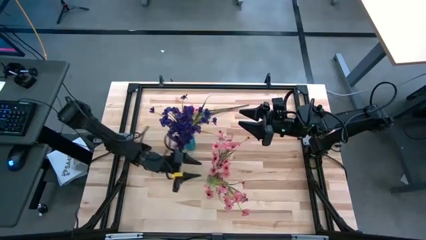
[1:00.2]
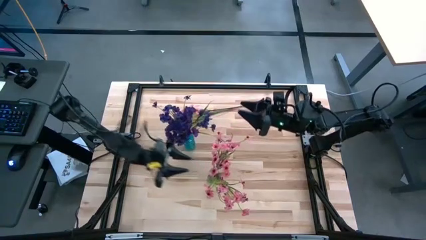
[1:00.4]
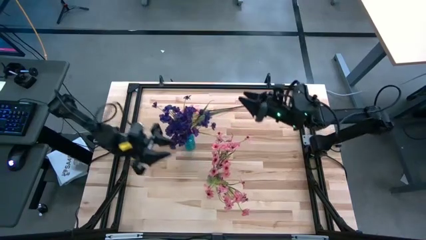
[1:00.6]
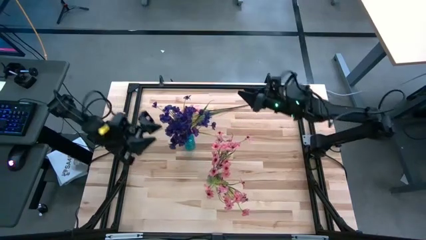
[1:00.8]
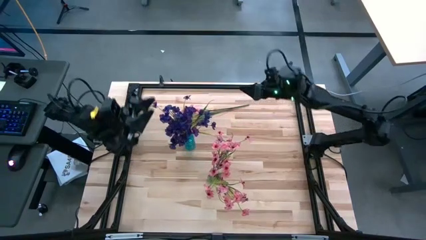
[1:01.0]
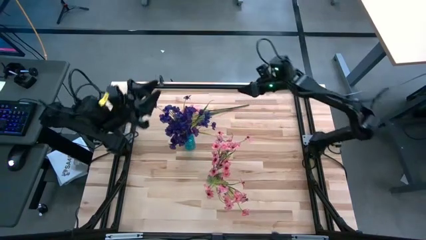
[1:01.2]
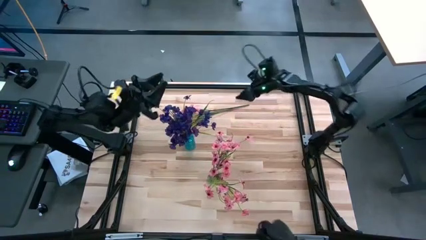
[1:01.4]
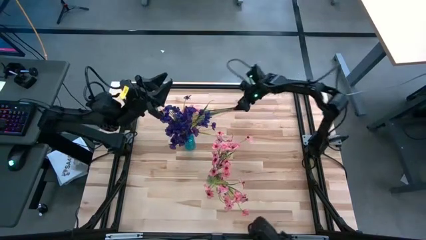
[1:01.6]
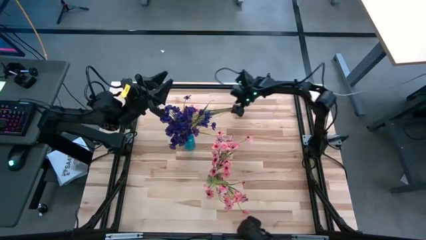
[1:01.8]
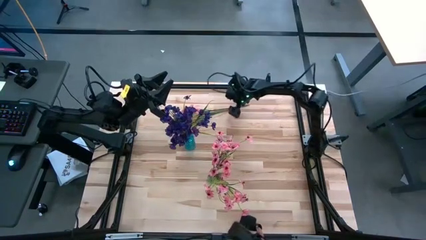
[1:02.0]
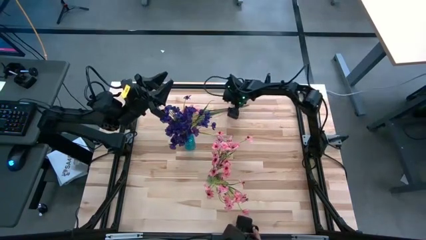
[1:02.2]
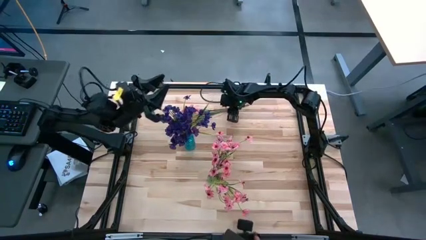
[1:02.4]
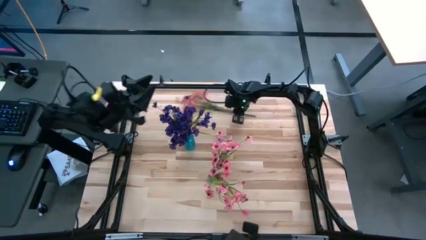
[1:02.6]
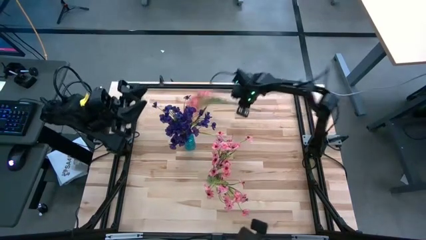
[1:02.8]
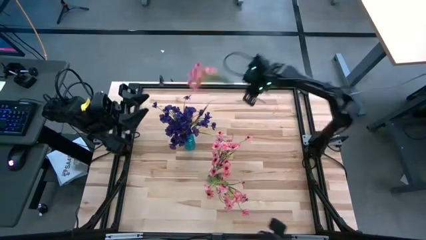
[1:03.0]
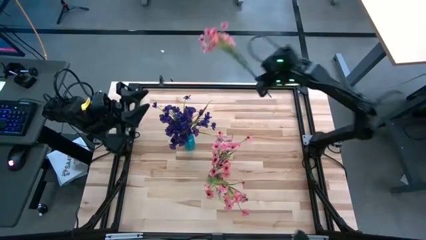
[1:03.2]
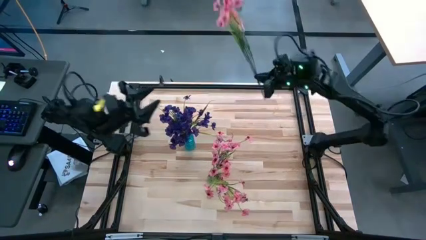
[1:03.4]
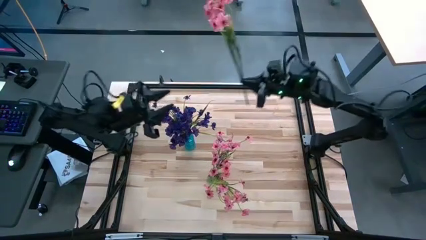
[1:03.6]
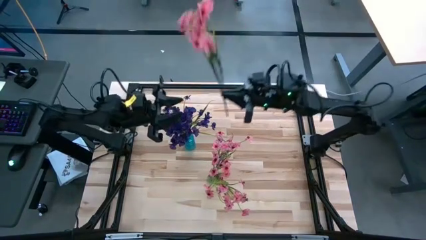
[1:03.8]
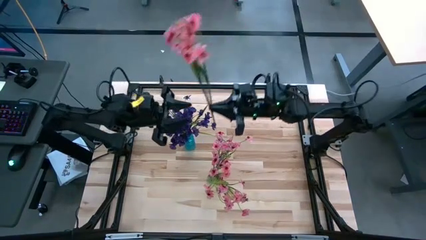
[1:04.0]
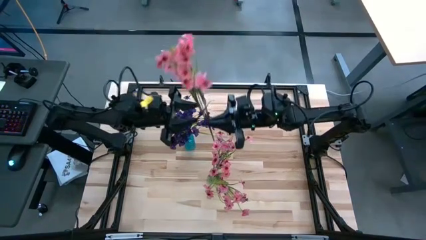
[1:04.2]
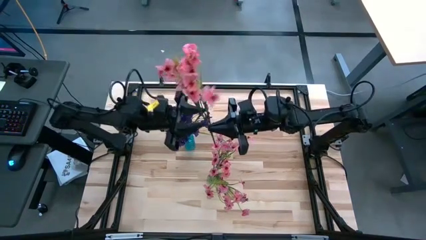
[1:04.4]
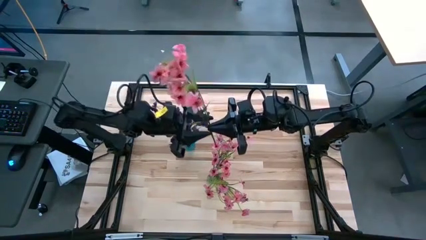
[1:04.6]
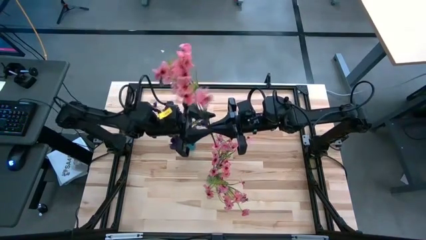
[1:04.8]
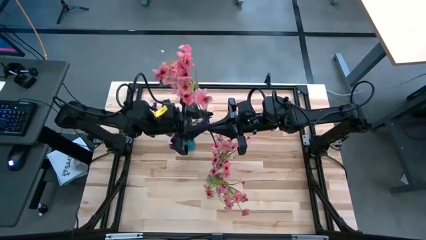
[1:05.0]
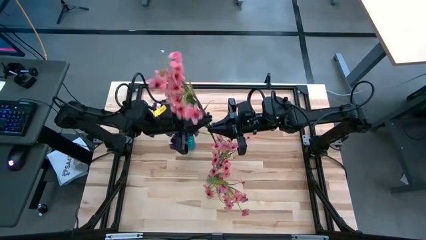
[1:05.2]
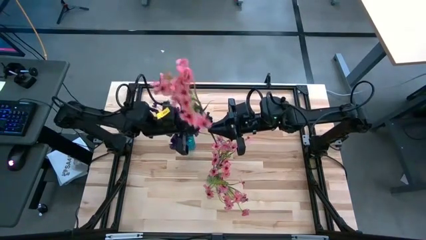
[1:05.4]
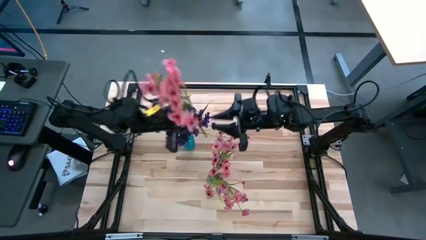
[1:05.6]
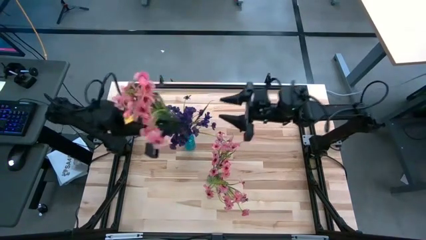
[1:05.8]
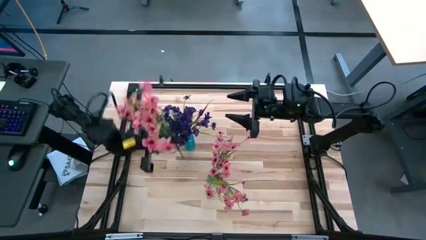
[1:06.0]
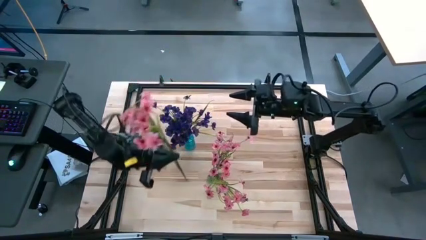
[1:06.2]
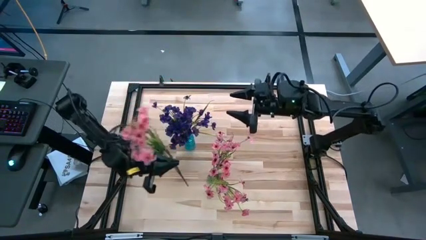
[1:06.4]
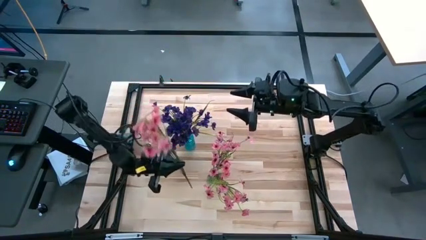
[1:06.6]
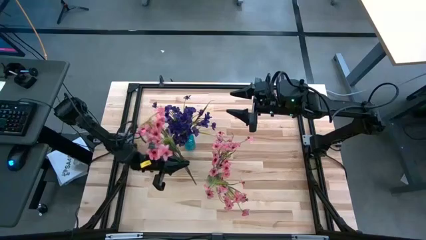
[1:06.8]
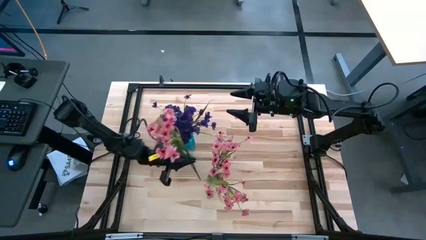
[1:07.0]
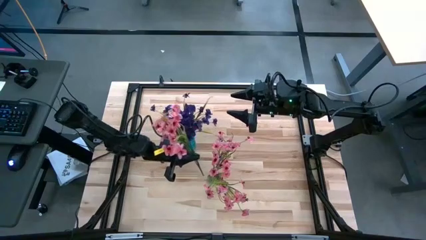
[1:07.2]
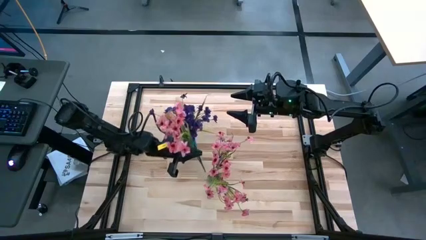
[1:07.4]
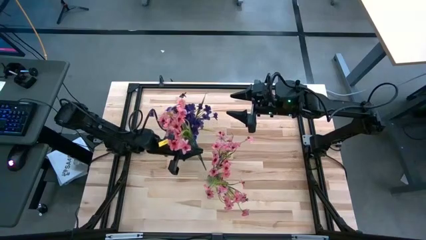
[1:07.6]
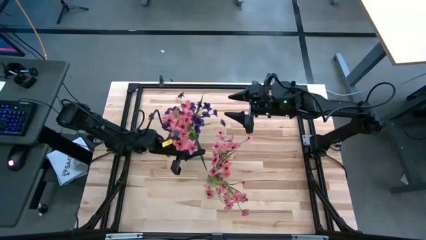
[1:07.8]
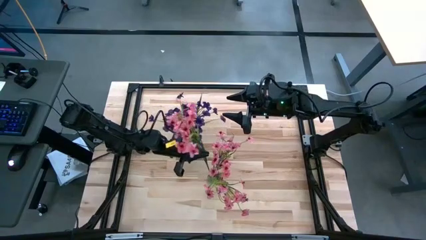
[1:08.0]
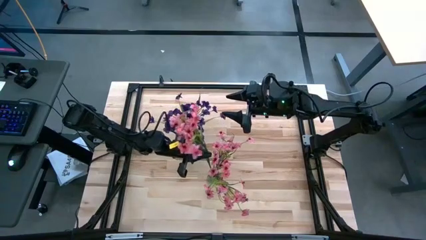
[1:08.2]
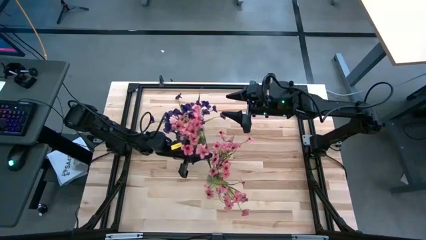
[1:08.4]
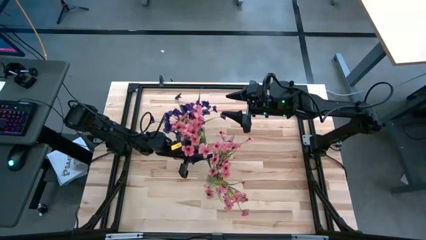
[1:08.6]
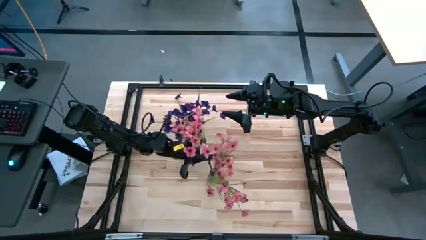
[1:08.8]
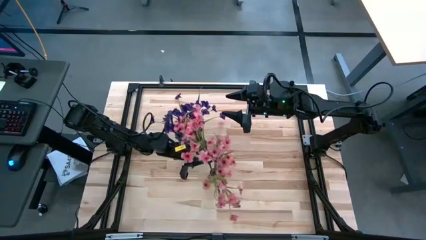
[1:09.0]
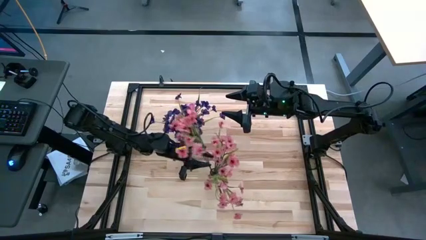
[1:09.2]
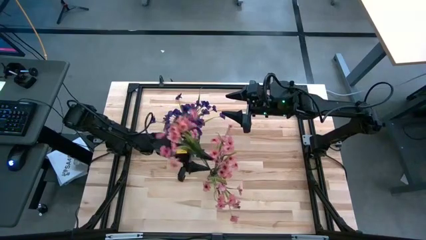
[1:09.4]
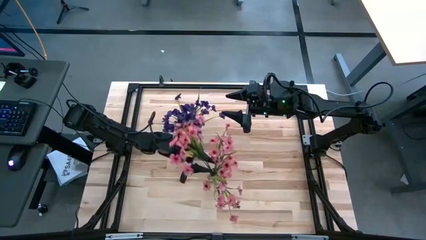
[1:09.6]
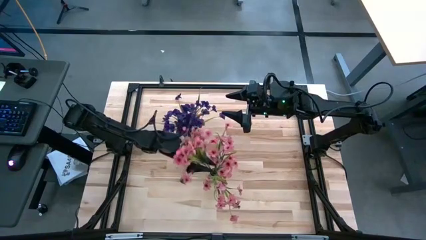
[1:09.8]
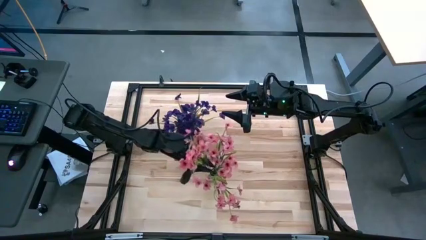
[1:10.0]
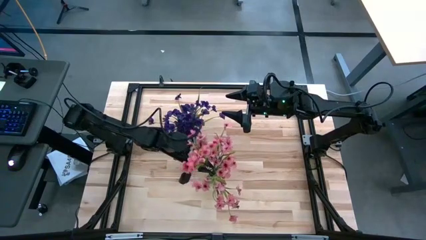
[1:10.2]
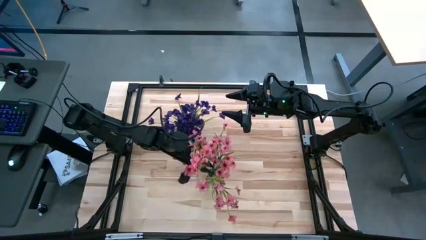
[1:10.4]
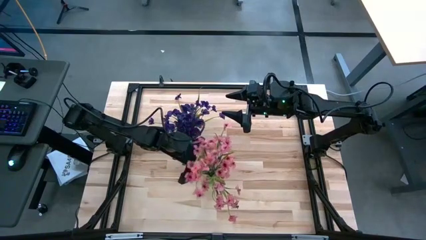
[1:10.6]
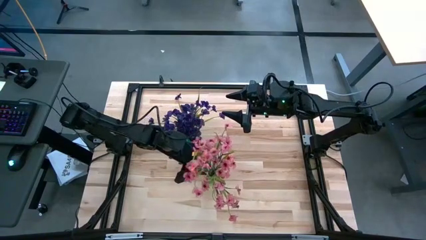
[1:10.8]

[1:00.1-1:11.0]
Task: Sort flowers into vase by color
Put the pink flowers into the green crystal vase

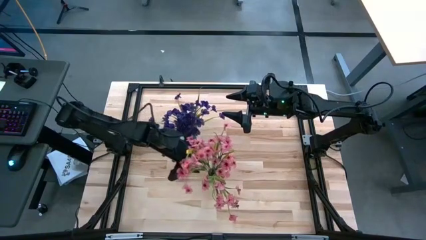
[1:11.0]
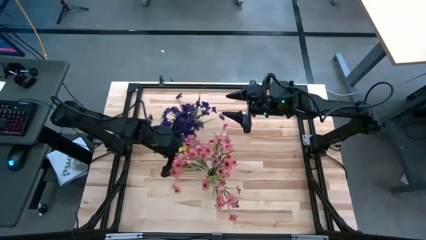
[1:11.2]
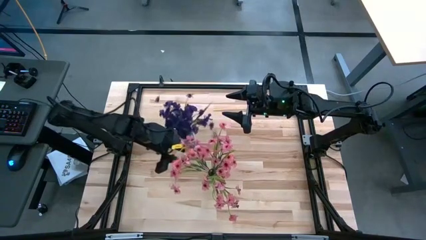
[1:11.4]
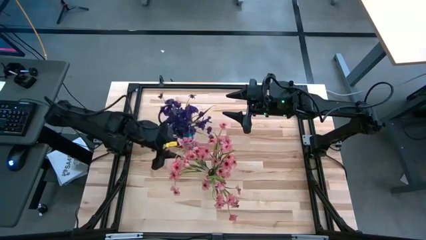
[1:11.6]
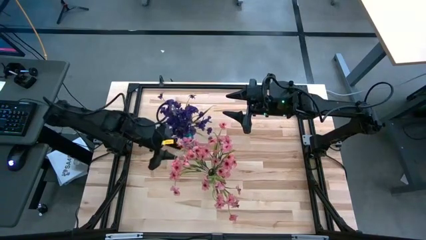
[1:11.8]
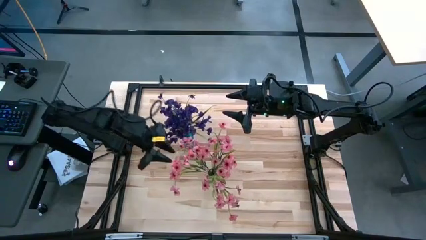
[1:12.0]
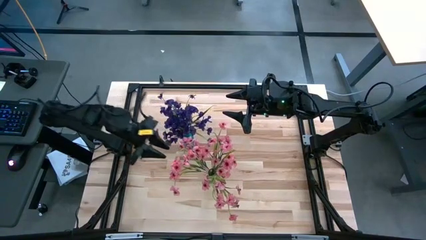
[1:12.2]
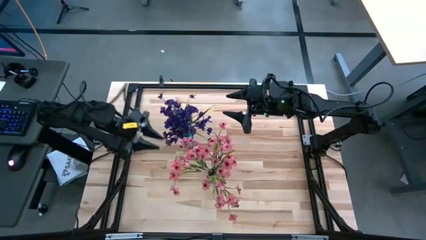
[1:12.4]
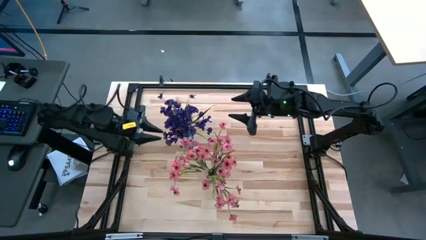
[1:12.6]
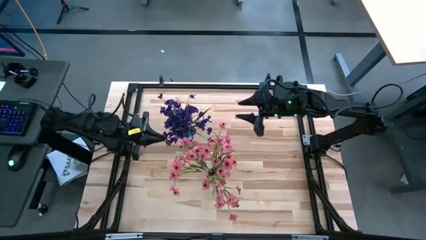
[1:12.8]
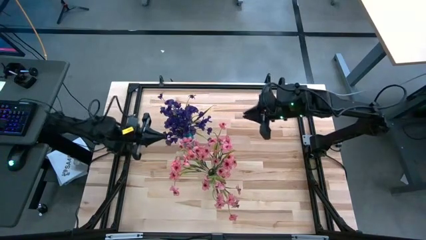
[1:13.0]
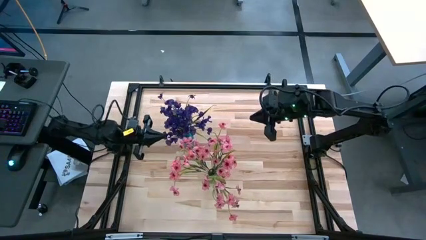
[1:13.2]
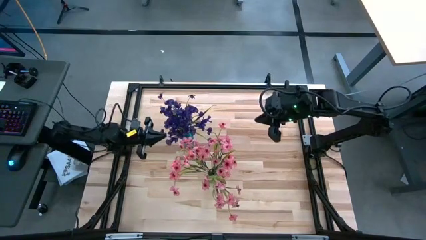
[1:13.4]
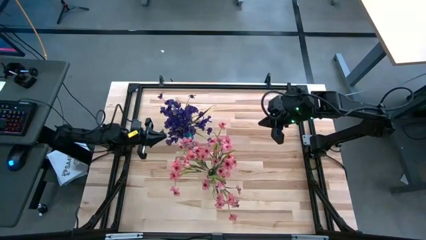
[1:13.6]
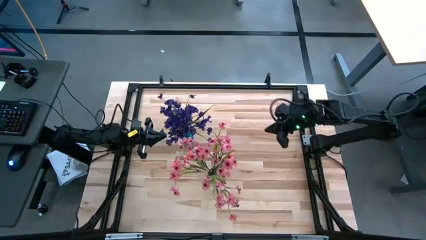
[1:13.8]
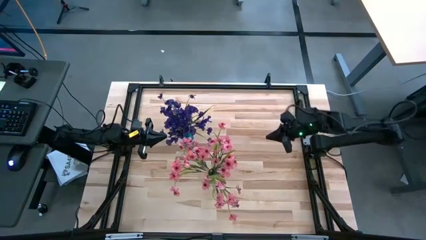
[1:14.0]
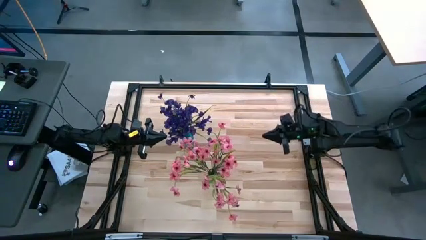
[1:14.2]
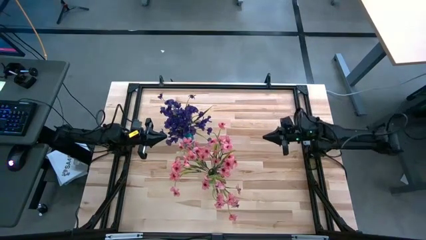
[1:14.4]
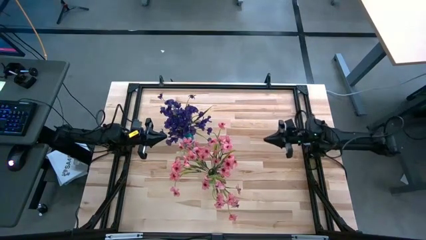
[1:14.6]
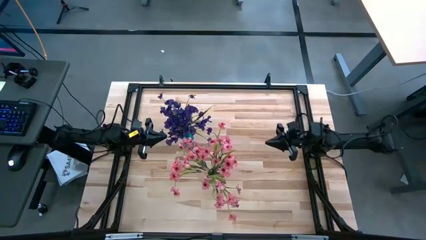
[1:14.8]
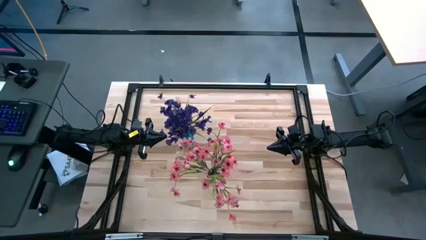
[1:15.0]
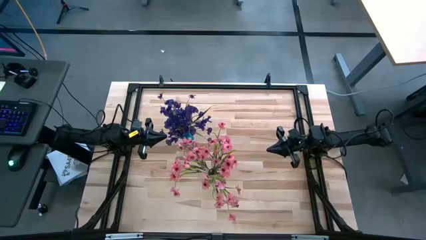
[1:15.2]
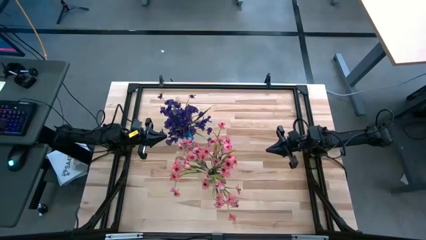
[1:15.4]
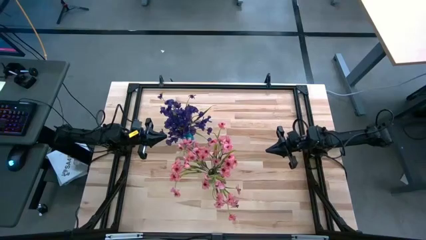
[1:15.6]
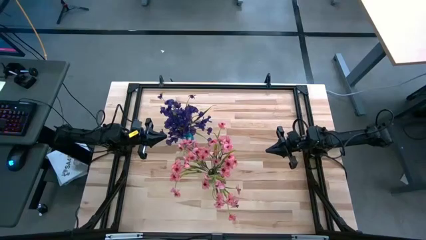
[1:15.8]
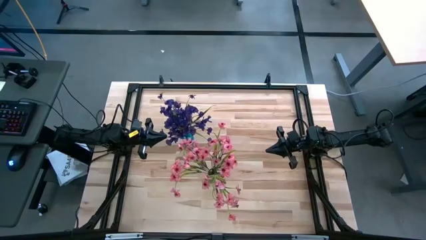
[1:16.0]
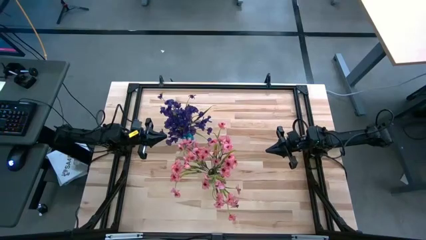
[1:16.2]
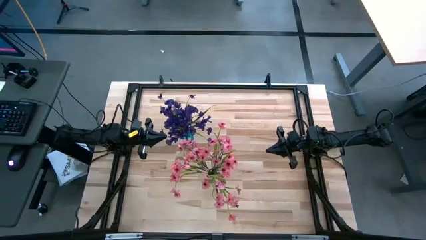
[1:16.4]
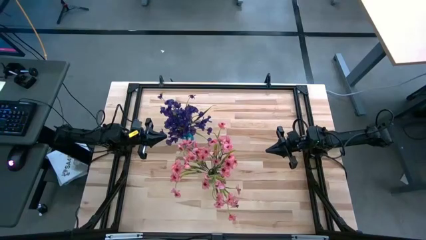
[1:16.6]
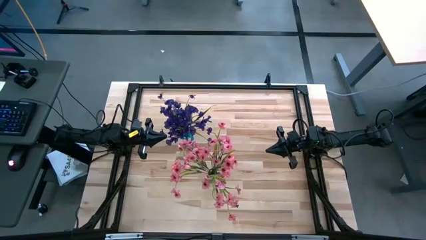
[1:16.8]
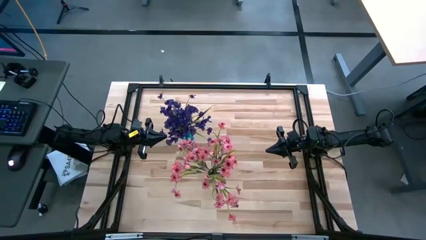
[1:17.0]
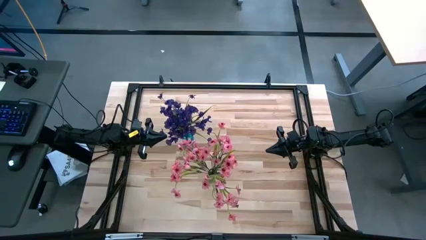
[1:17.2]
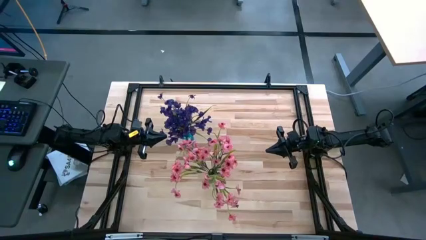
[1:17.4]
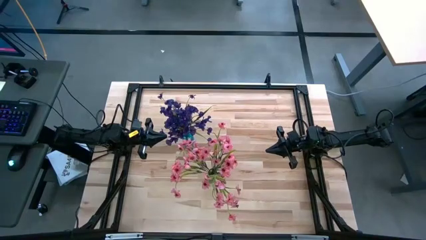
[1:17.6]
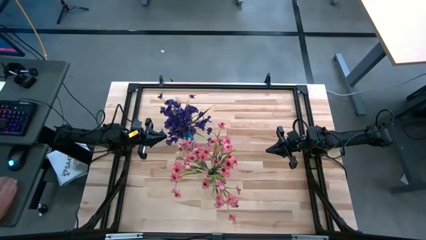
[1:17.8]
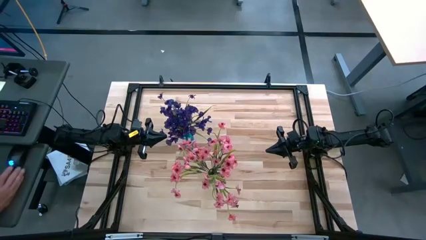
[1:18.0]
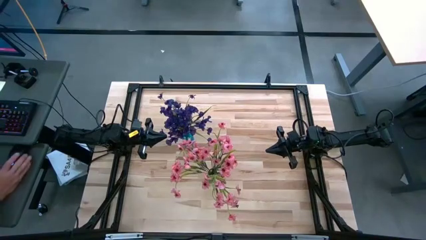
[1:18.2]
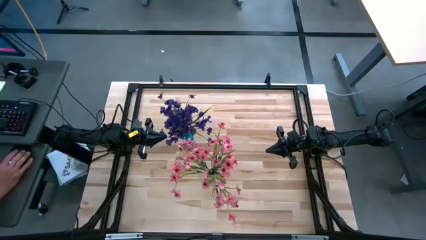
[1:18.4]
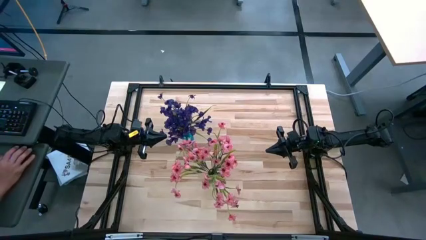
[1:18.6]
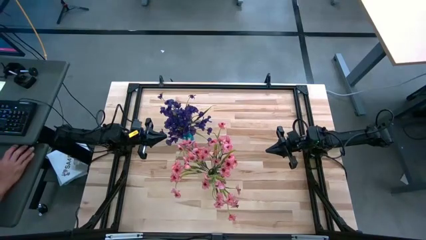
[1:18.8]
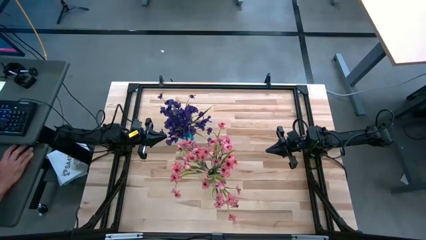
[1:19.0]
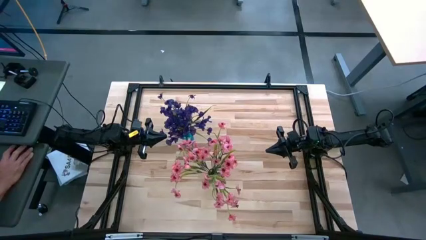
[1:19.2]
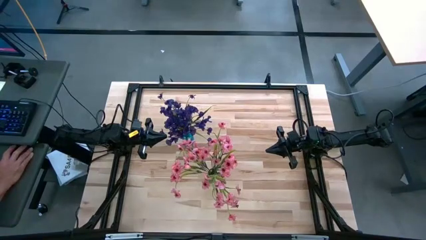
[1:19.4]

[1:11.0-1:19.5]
Return to Home Position
